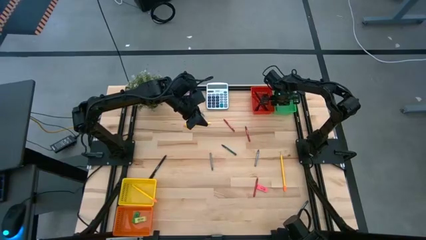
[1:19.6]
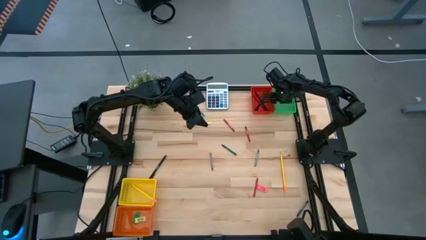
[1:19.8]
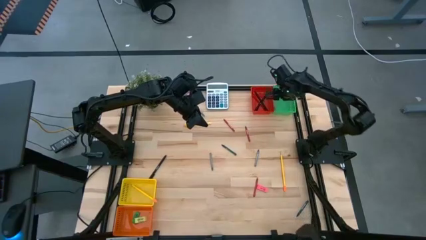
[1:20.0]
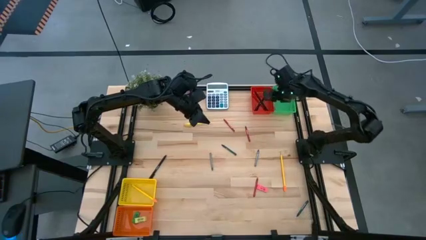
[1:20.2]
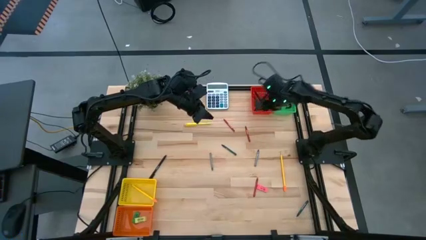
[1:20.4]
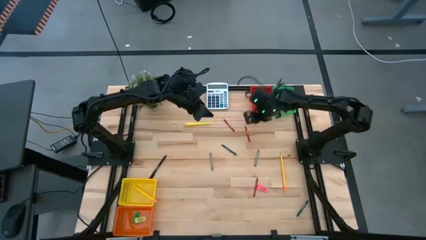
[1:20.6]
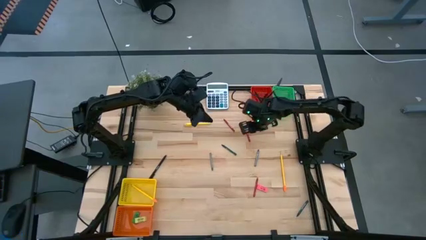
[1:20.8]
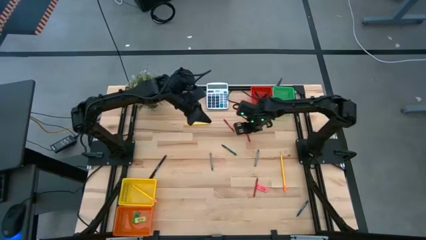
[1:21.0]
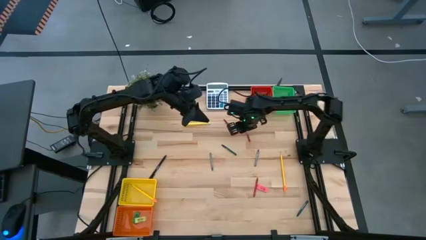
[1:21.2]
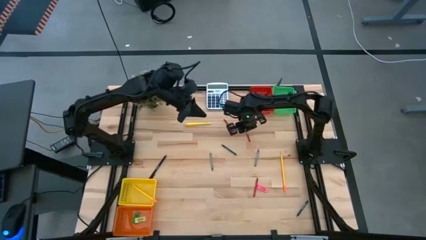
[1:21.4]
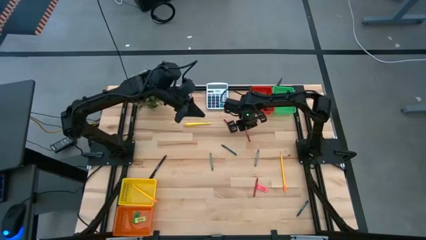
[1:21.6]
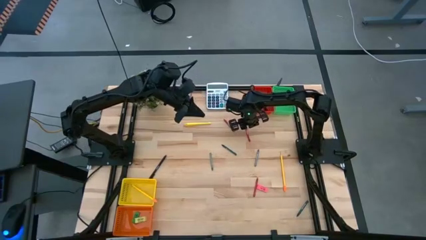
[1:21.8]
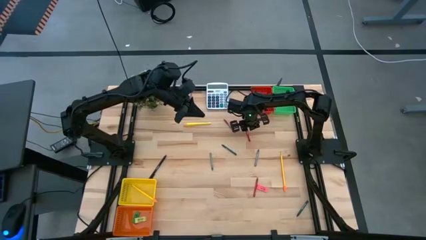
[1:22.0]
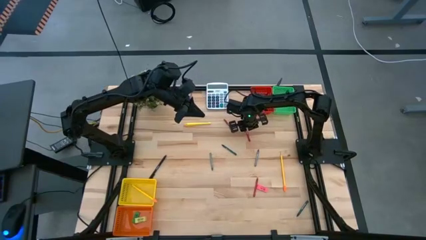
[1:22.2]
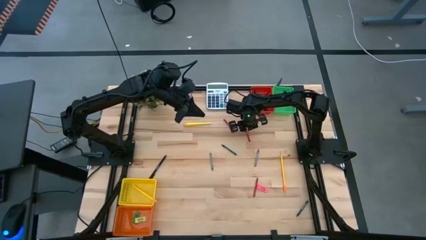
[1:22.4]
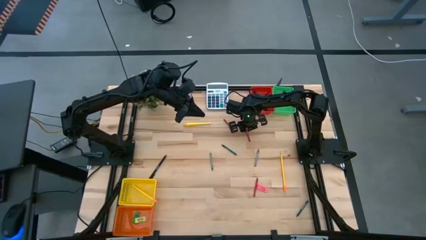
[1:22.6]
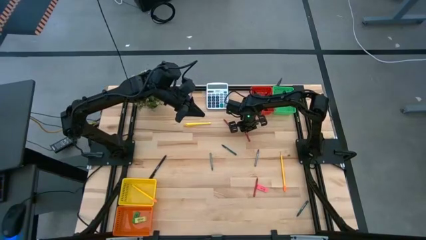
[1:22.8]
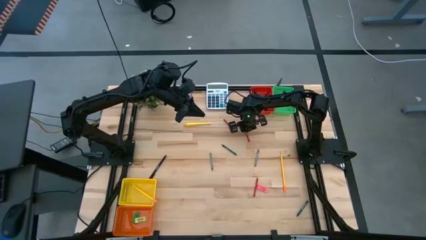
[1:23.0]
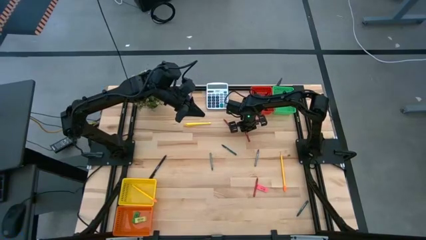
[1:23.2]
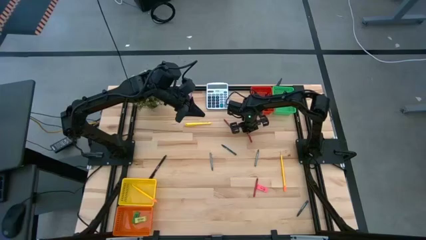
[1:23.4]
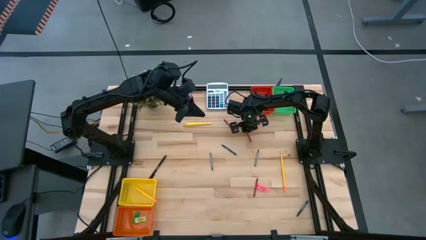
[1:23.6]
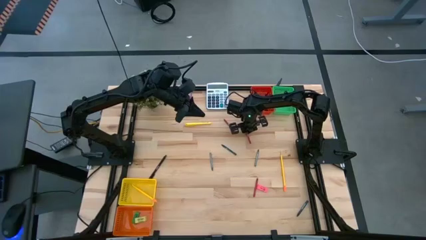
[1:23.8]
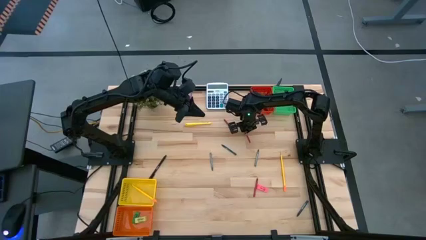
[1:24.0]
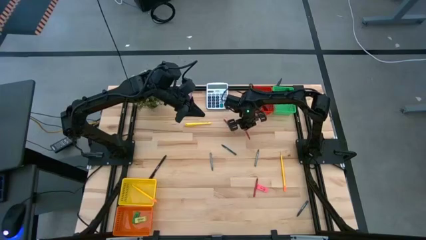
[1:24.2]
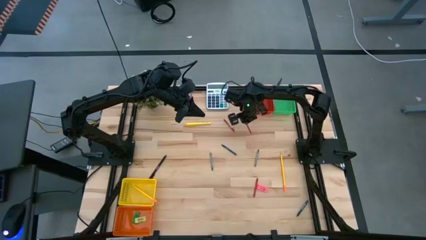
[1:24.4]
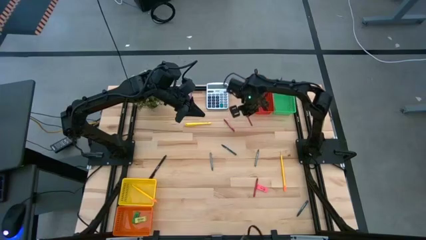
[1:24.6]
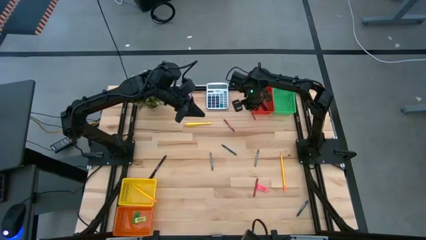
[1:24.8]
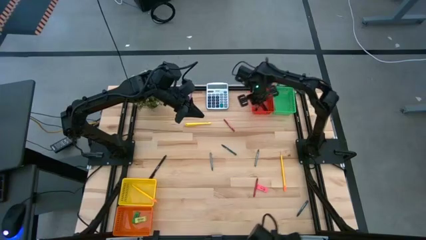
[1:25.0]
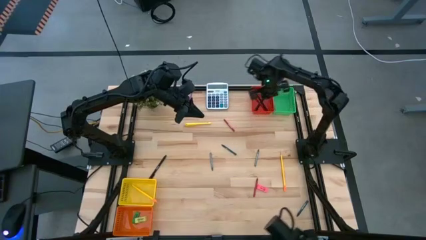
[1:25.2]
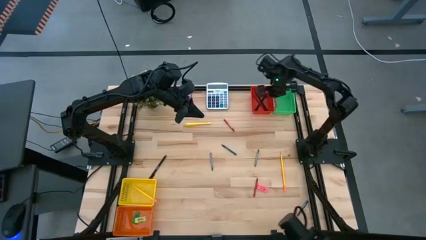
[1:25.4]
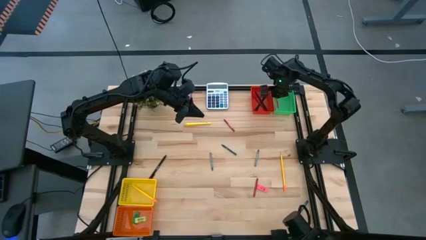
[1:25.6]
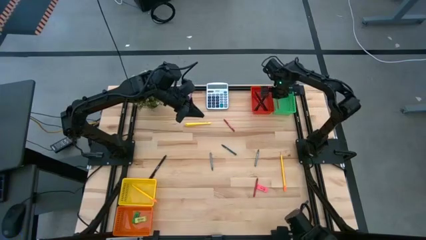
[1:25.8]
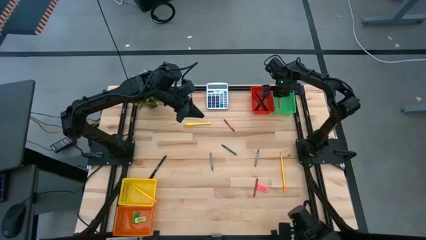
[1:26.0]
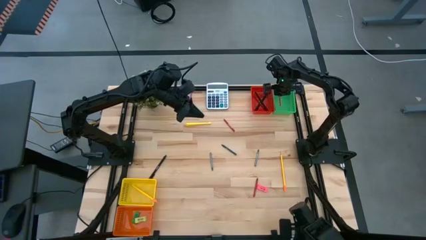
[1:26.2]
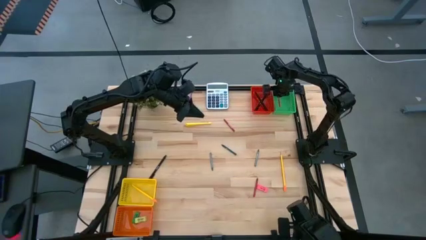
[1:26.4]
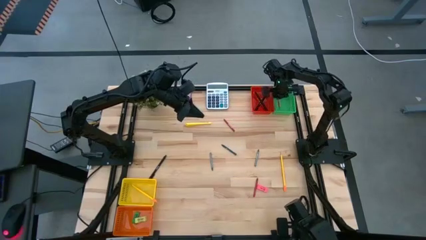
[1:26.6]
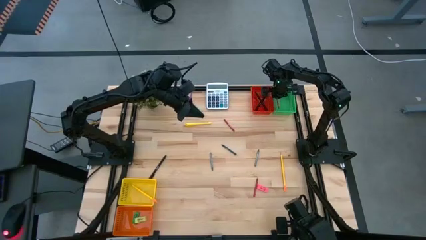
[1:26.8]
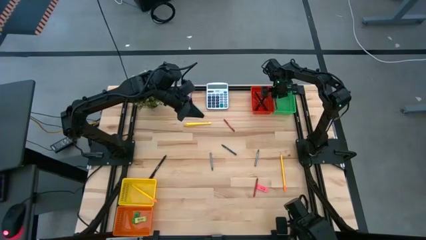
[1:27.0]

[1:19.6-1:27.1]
Task: Sort crayons/erasers/pens/pencils in bins
Put the top right red crayon into the green bin

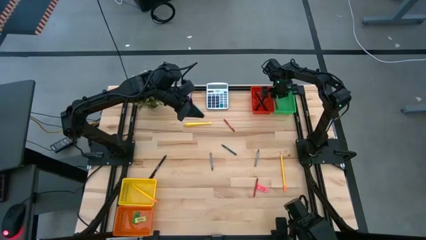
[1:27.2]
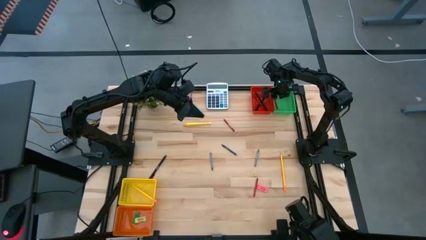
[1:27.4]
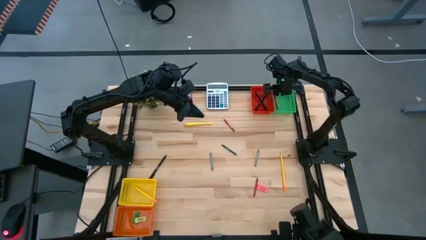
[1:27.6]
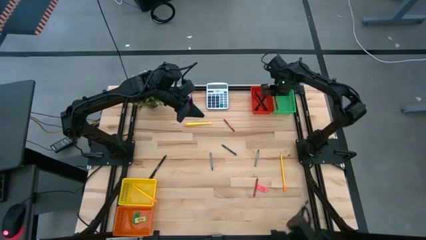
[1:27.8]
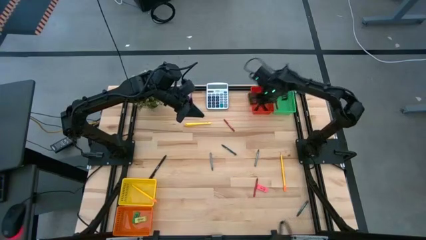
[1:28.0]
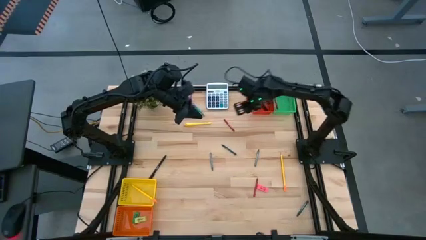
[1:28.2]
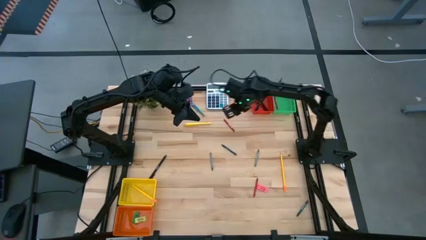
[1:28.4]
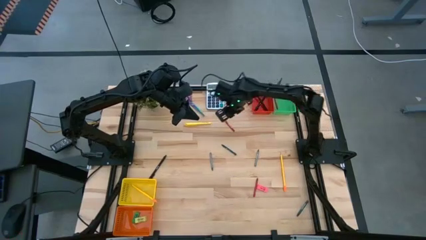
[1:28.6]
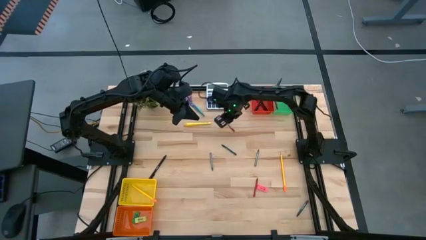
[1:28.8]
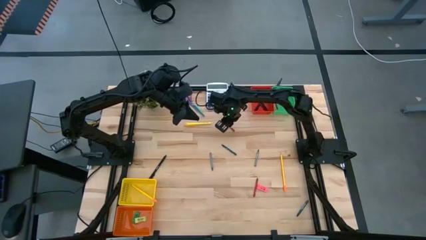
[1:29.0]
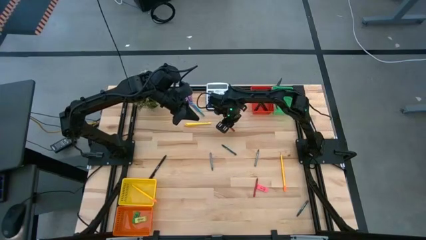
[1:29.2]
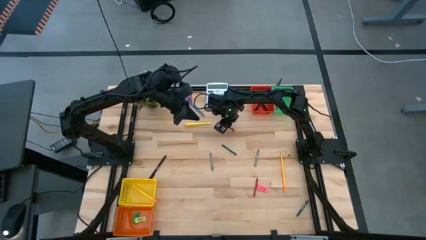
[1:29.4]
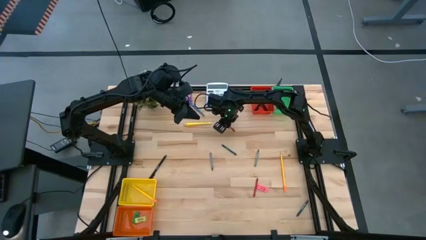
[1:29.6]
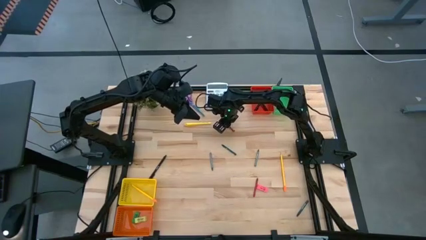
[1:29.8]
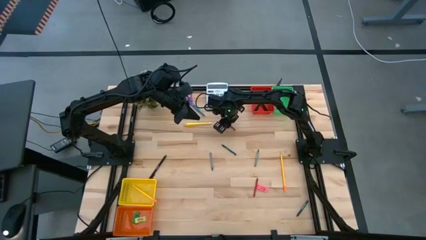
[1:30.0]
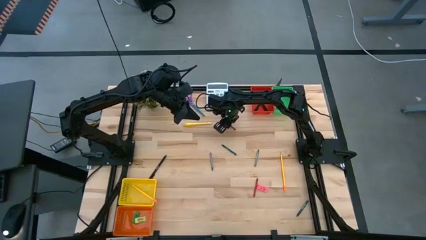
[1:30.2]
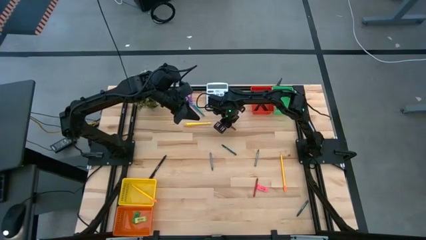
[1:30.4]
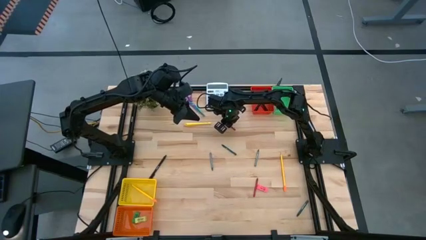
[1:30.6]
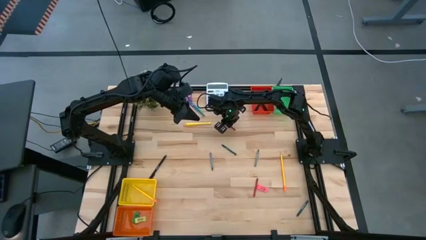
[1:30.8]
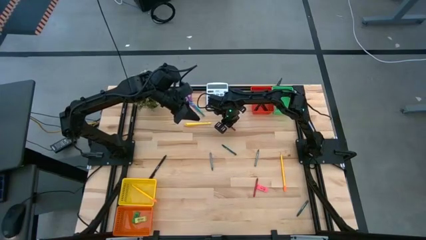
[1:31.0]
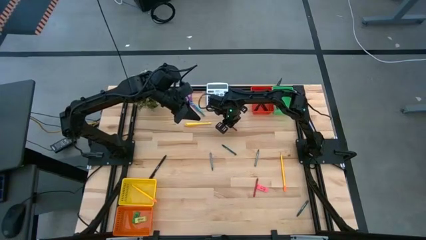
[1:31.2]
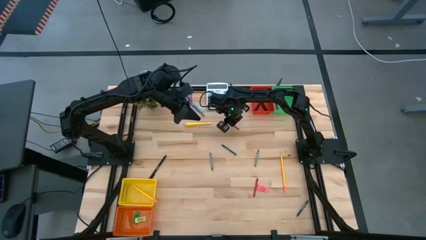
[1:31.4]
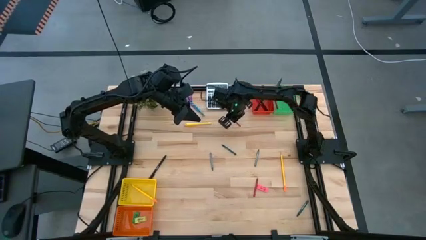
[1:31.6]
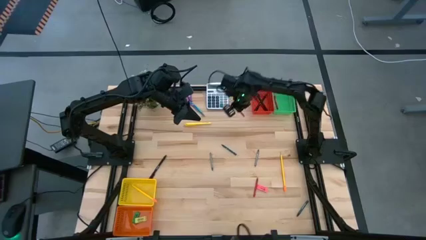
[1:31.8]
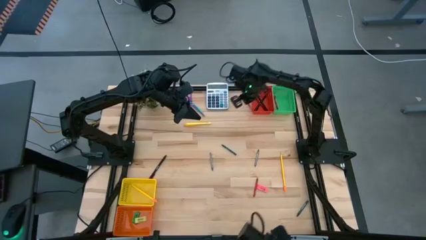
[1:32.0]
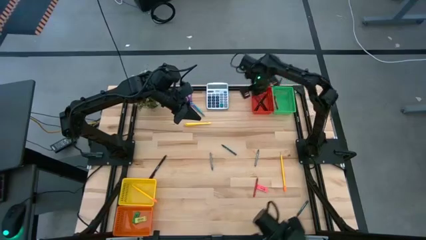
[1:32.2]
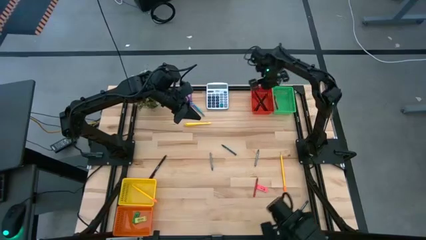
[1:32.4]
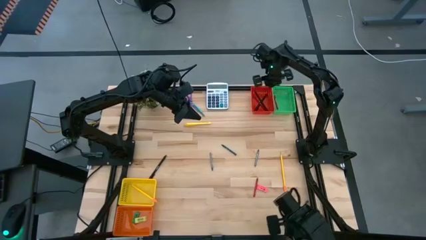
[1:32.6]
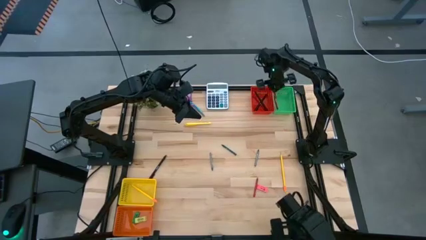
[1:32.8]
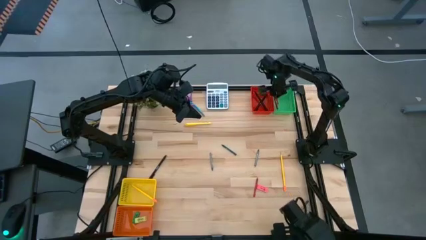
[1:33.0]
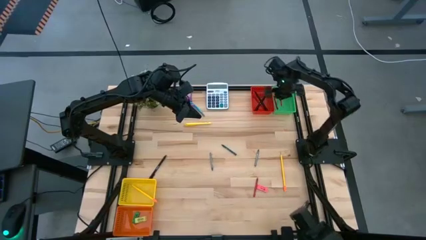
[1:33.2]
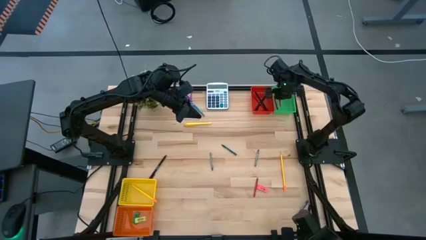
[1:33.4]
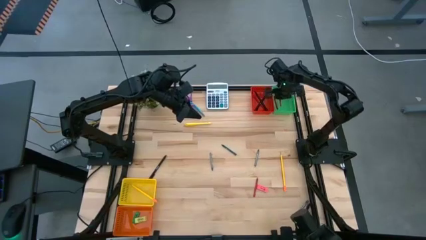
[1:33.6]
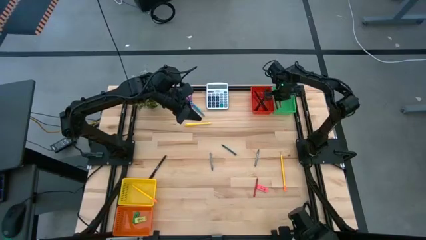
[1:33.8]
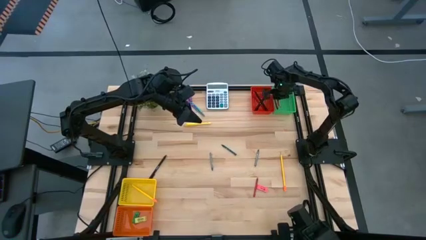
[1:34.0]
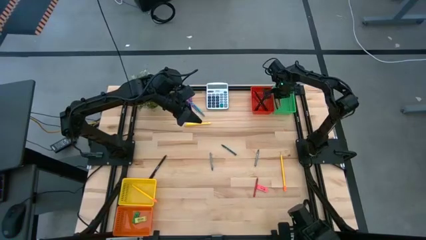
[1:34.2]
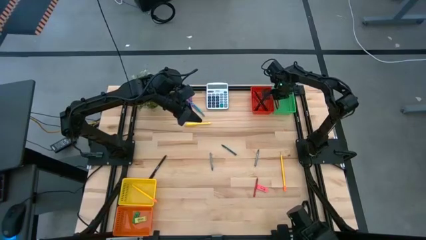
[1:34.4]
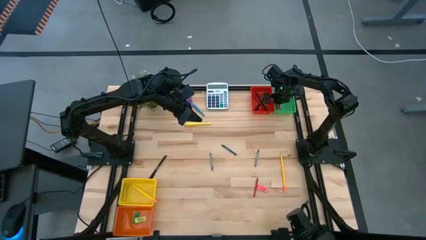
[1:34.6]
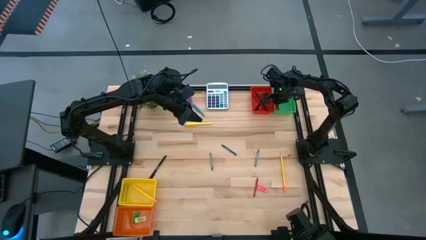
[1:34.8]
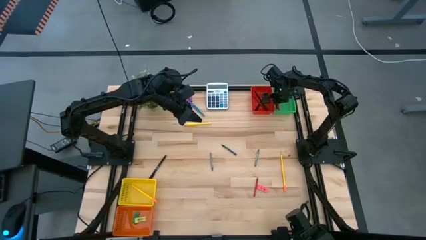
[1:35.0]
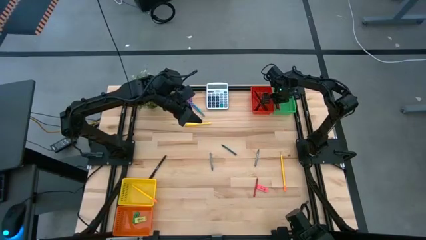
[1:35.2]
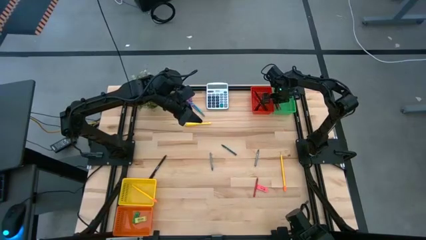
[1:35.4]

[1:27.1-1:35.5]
Put the top red crayon into the green bin
